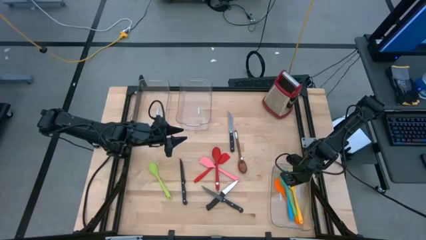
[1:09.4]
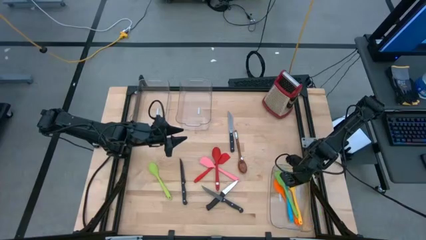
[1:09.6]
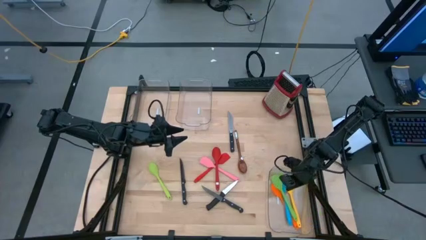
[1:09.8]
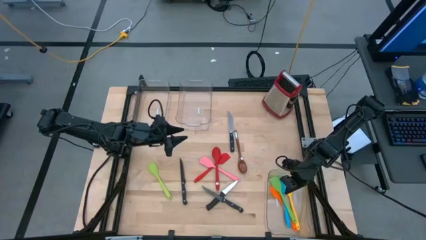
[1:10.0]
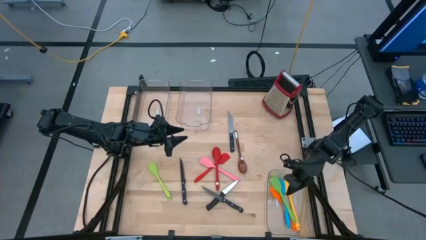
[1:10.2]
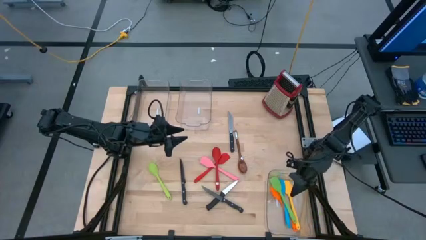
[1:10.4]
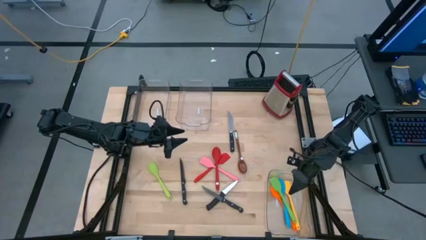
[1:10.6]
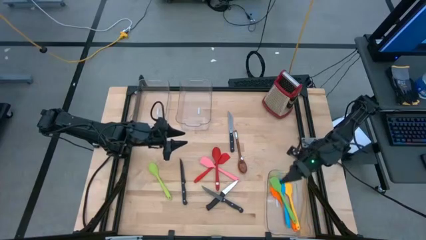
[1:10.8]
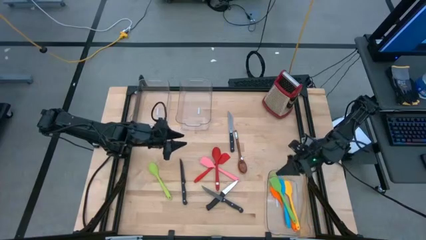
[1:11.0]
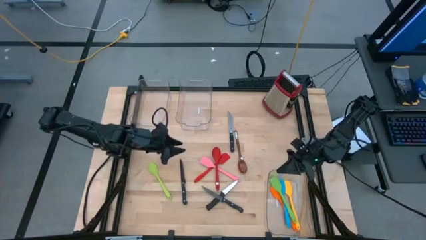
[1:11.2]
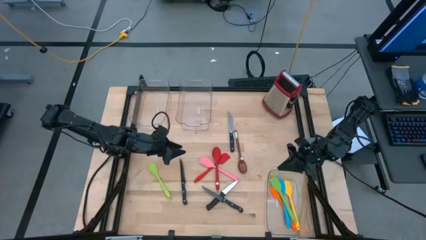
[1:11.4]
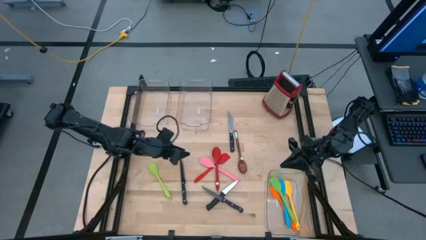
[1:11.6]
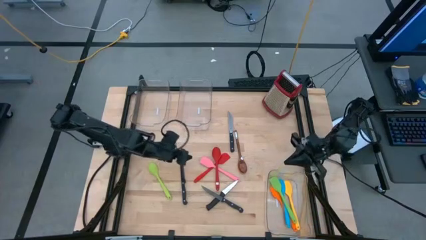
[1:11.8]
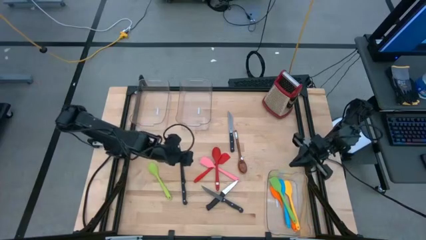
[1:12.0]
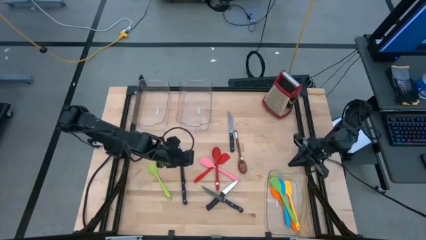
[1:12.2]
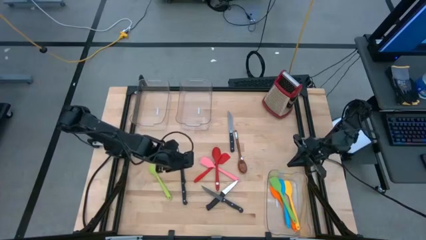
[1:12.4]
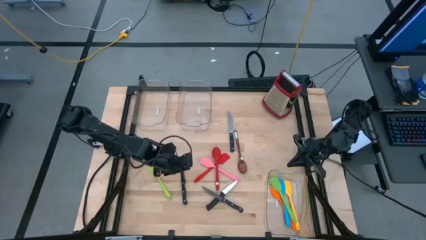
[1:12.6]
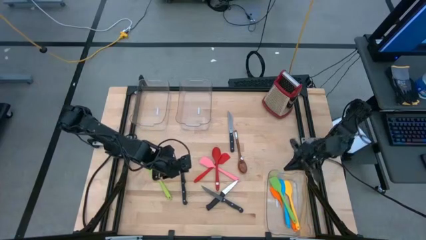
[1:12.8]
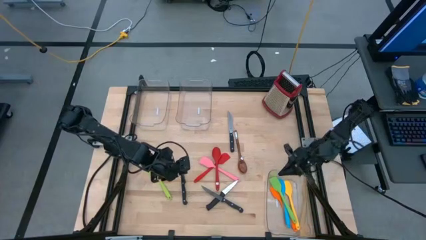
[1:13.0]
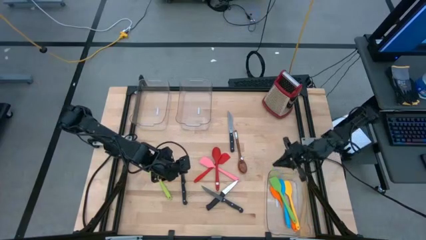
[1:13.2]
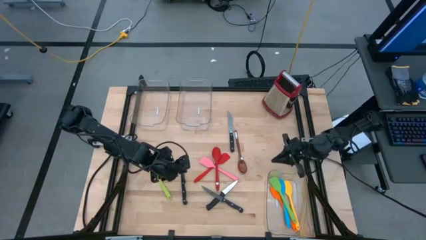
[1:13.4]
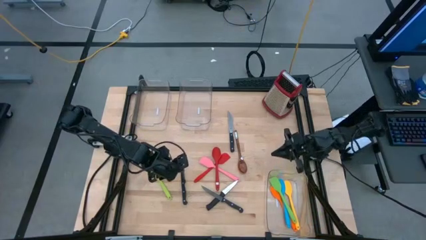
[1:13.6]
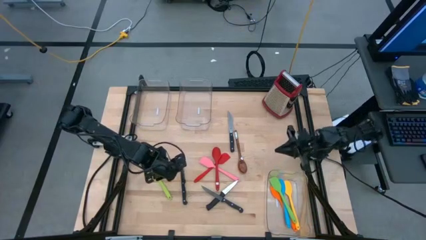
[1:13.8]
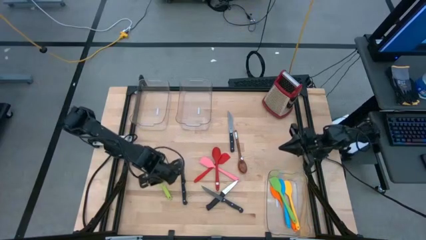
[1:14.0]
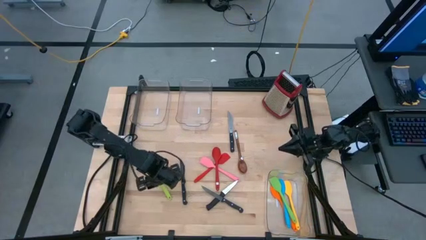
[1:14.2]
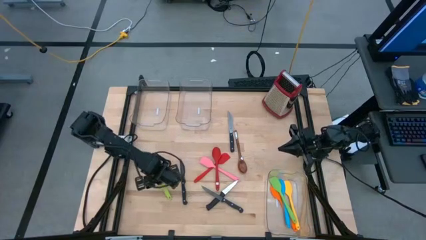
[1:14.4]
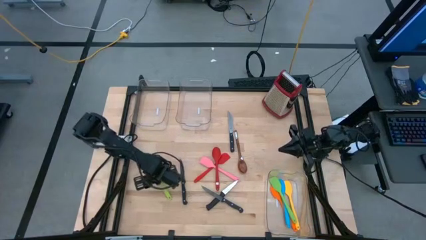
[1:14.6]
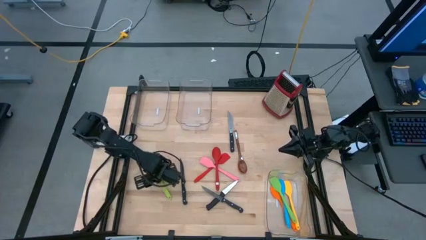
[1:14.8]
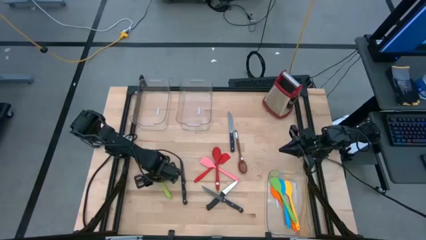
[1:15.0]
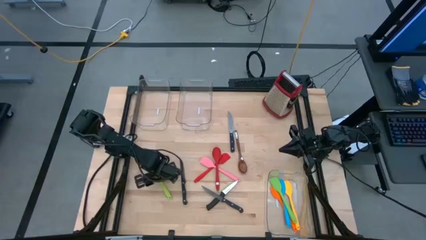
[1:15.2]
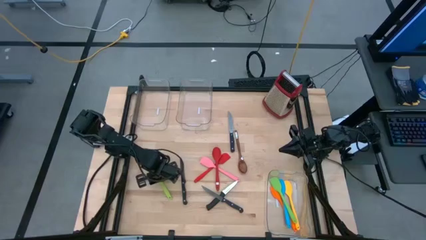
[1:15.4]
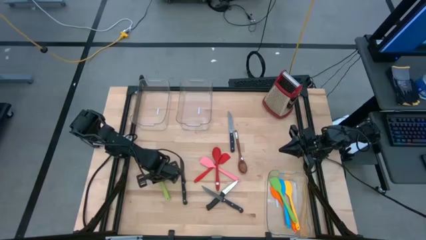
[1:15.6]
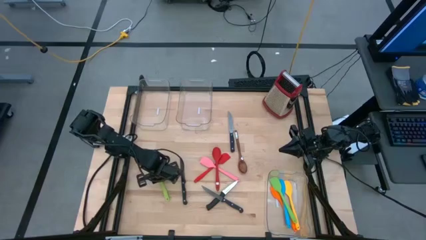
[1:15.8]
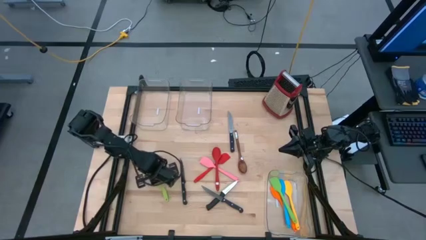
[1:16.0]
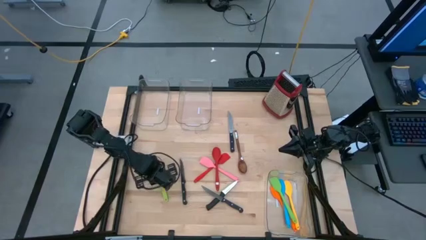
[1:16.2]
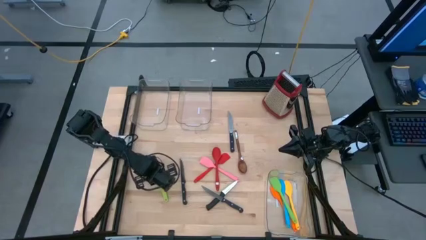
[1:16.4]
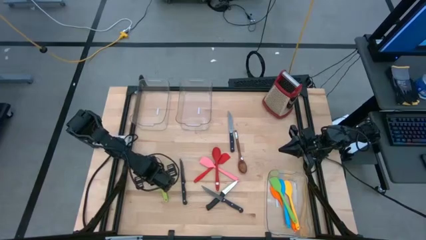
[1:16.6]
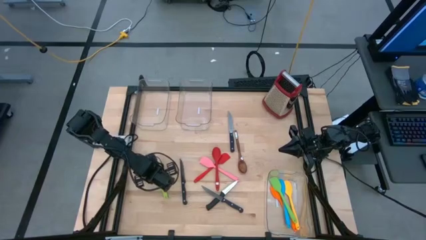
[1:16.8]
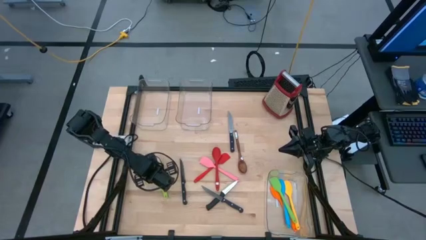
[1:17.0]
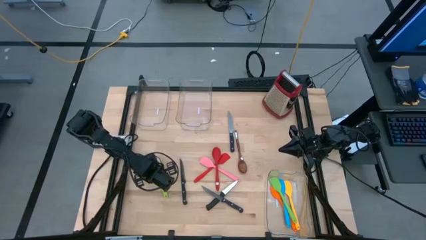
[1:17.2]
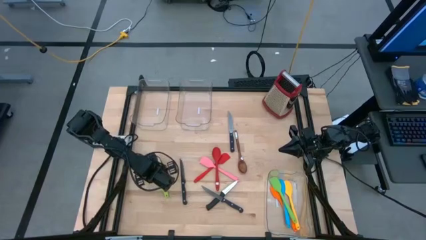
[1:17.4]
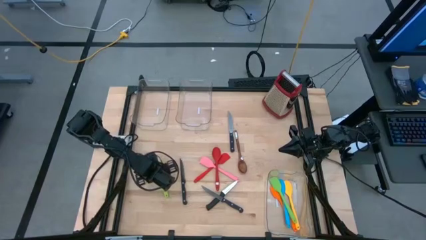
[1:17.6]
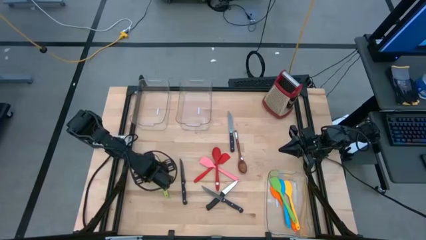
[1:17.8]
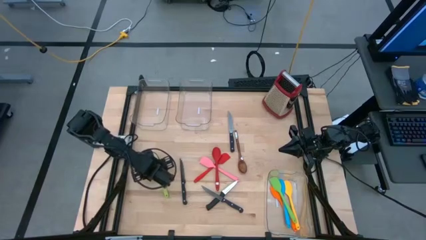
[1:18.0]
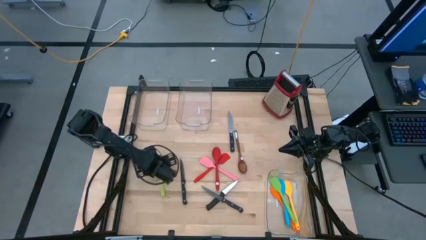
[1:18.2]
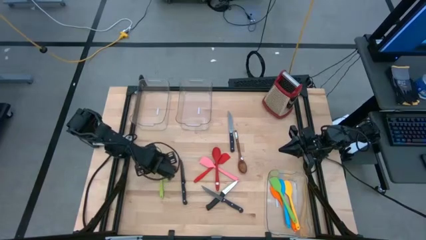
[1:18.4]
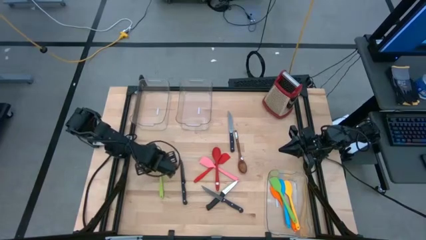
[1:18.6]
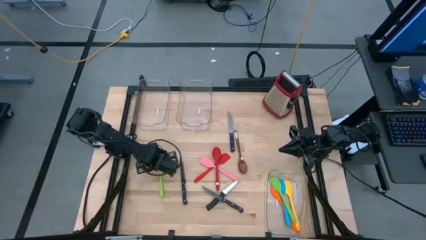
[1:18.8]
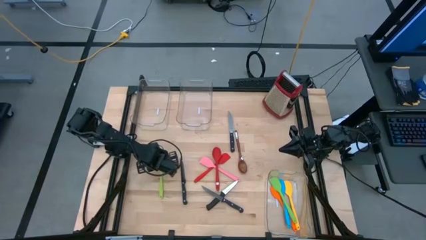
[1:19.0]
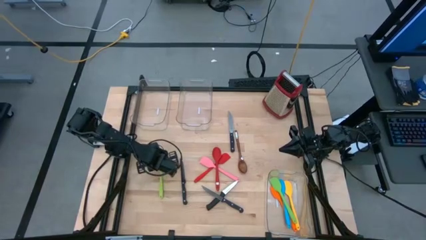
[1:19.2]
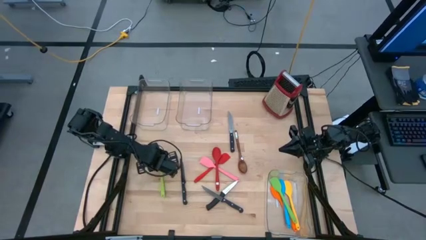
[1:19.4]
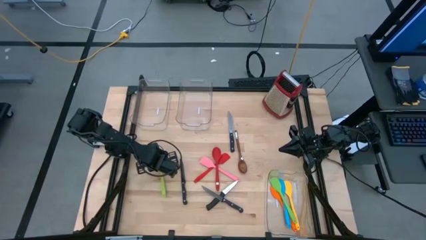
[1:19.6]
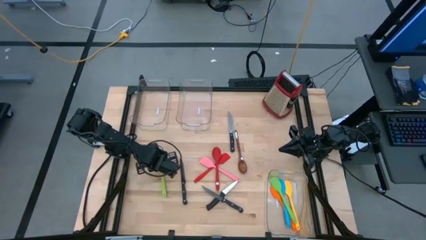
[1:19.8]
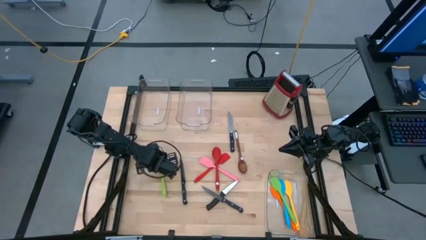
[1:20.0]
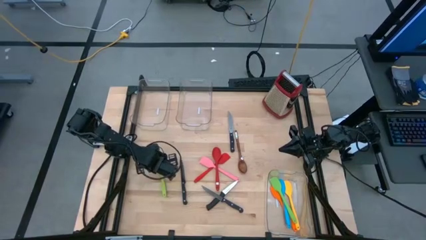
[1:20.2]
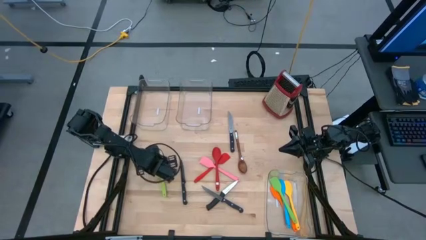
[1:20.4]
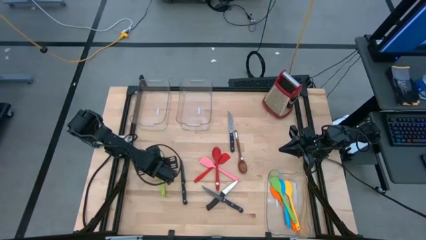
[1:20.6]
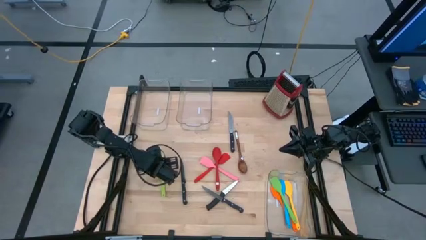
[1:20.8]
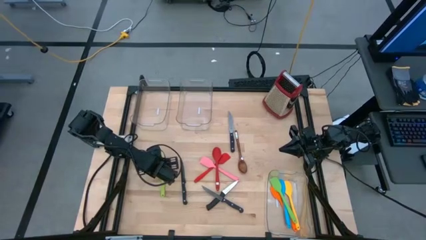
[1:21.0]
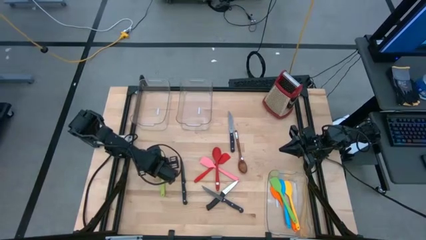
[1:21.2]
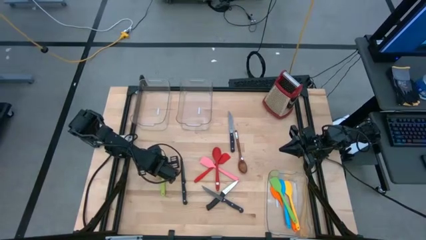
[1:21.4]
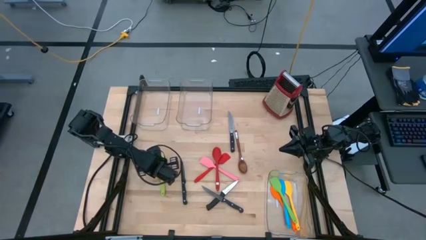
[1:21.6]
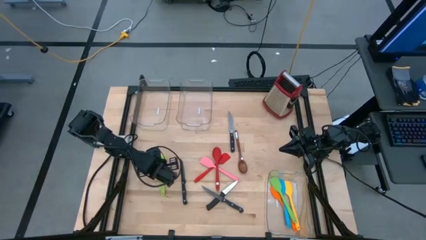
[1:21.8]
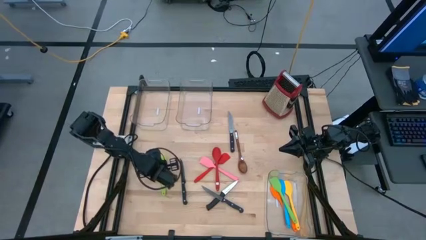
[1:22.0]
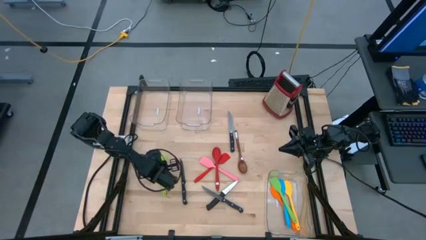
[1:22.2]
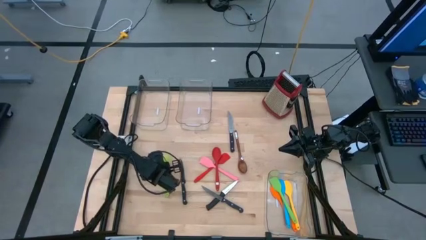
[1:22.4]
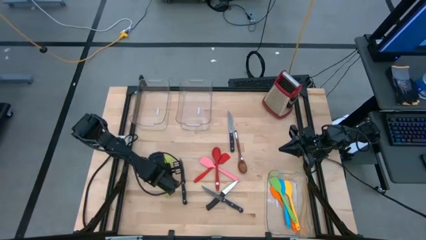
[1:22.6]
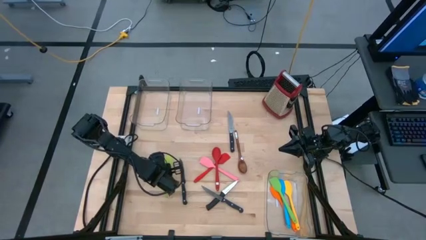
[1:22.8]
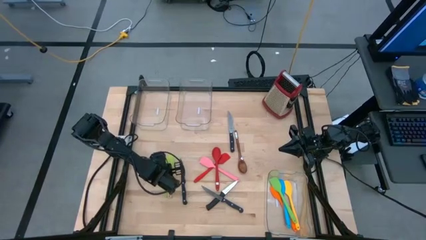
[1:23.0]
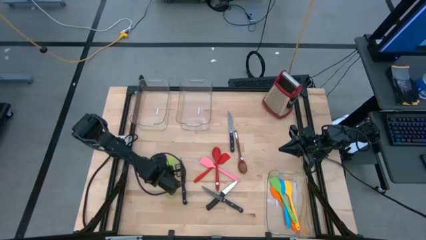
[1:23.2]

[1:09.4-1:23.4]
Task: Pick & Place Kitchen Items
Put the light green serving spoon into the top right transparent bin
